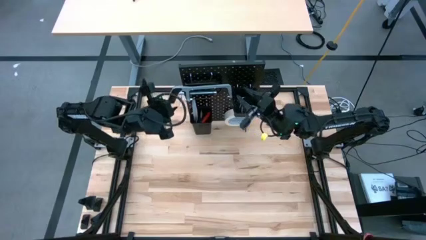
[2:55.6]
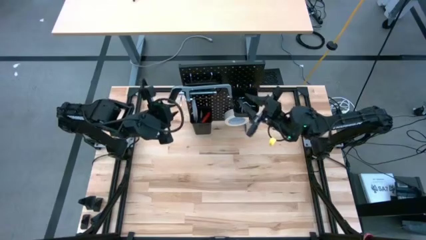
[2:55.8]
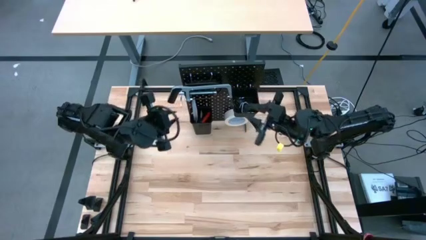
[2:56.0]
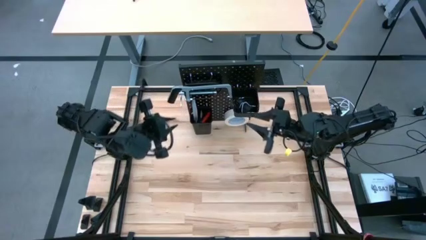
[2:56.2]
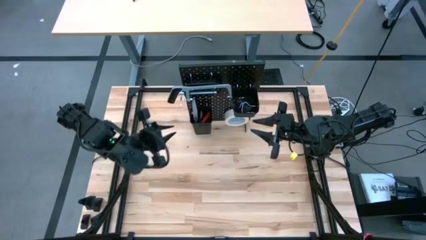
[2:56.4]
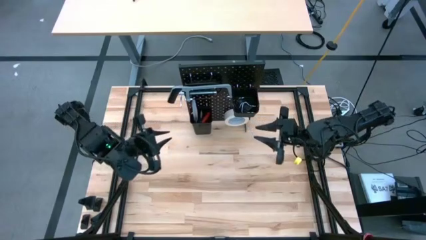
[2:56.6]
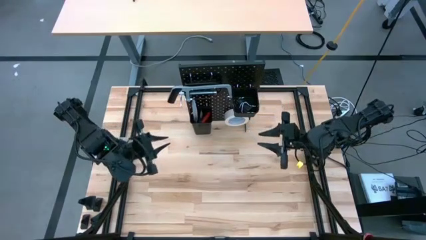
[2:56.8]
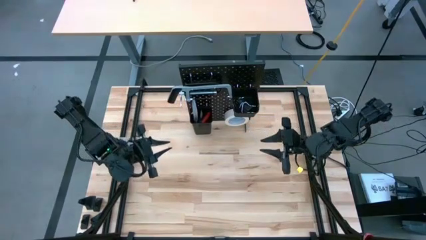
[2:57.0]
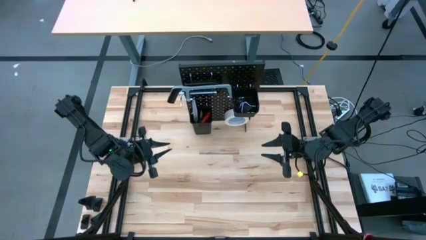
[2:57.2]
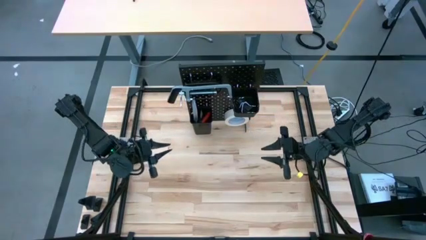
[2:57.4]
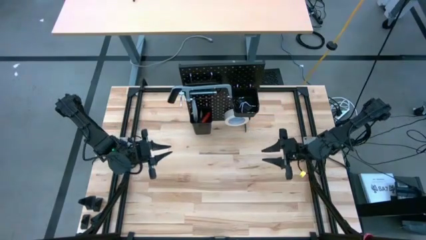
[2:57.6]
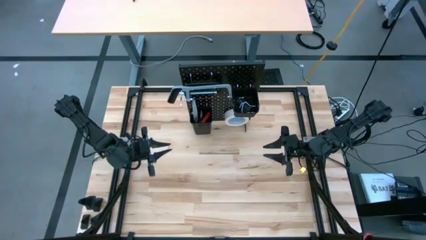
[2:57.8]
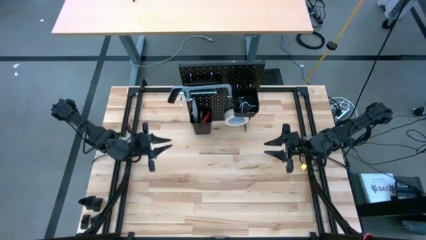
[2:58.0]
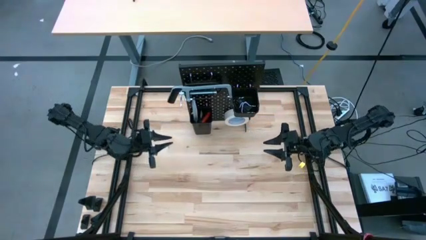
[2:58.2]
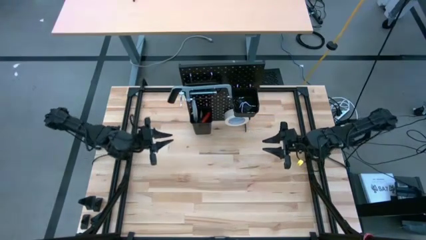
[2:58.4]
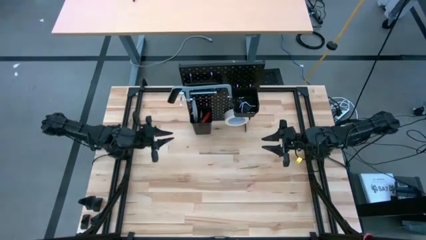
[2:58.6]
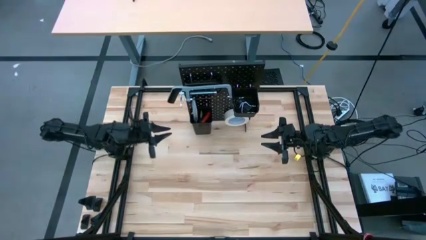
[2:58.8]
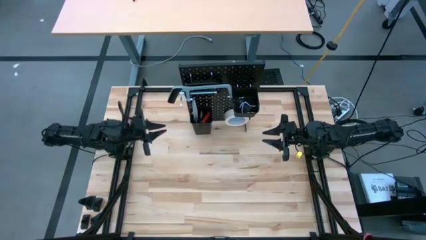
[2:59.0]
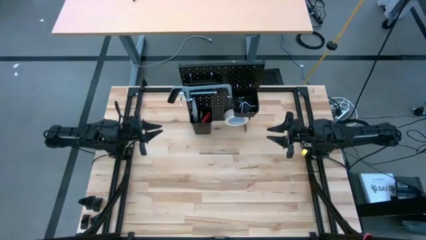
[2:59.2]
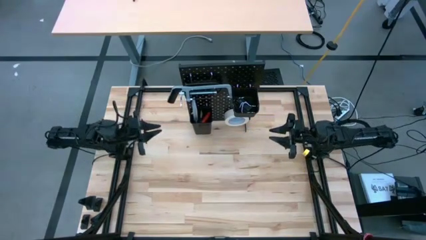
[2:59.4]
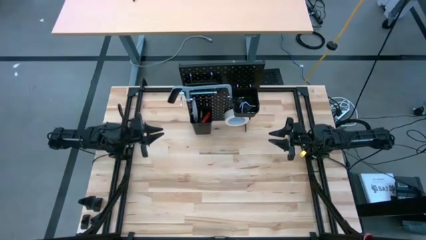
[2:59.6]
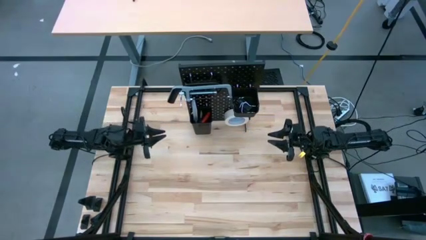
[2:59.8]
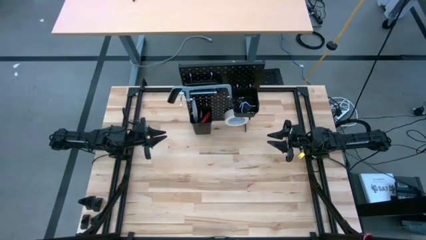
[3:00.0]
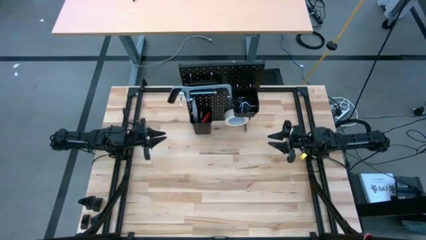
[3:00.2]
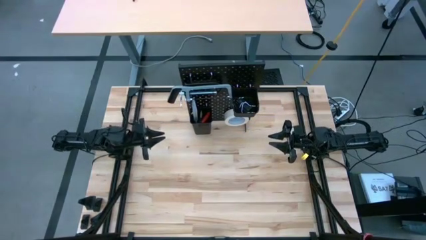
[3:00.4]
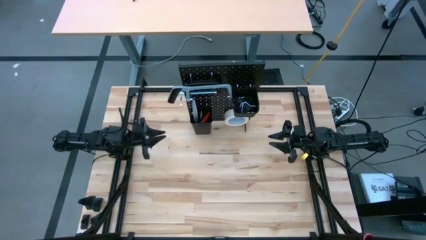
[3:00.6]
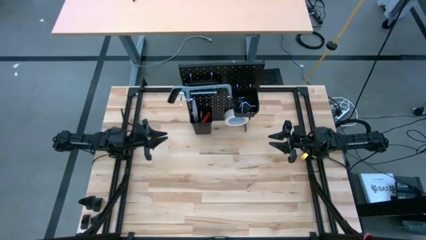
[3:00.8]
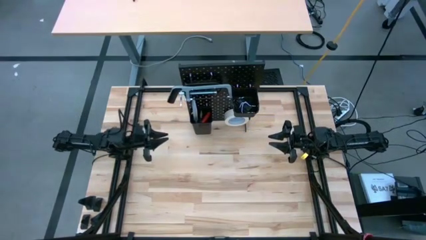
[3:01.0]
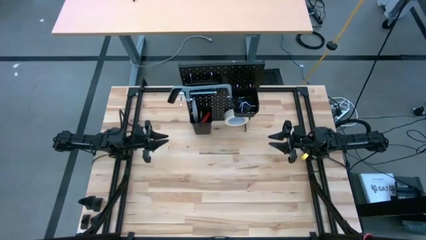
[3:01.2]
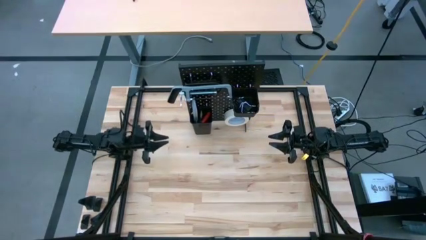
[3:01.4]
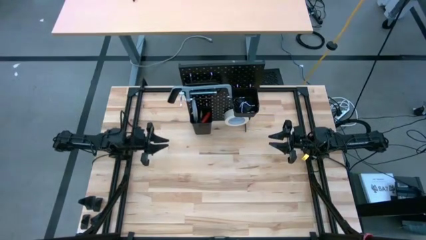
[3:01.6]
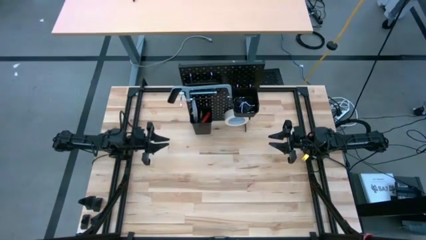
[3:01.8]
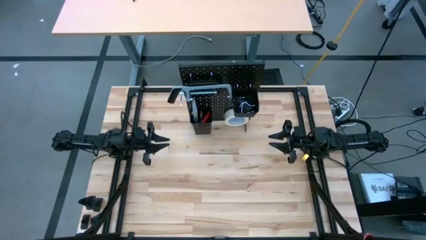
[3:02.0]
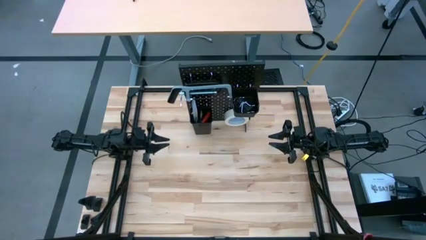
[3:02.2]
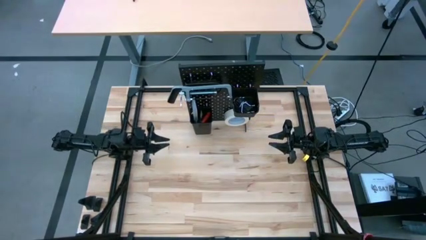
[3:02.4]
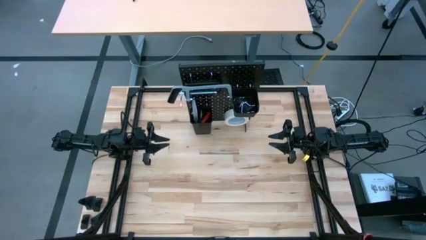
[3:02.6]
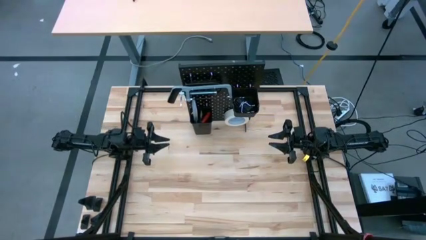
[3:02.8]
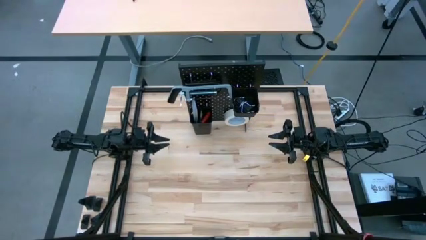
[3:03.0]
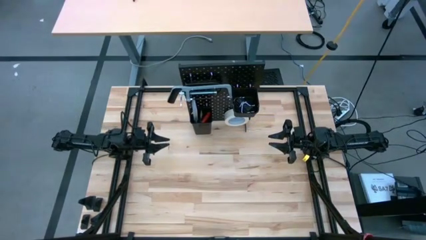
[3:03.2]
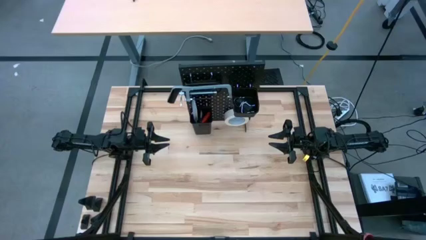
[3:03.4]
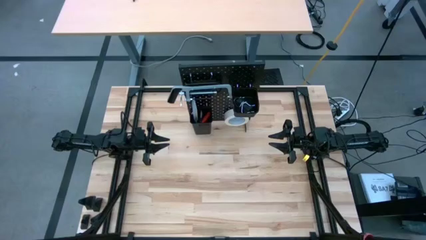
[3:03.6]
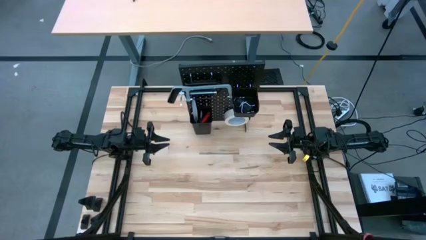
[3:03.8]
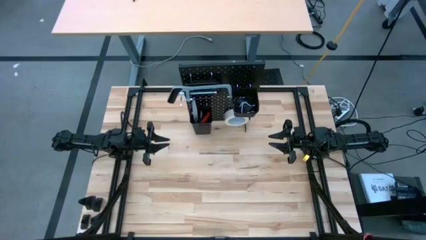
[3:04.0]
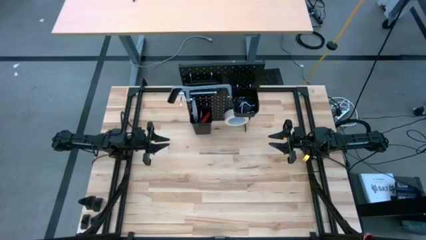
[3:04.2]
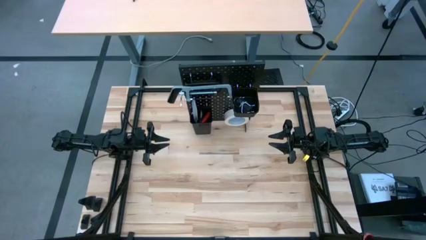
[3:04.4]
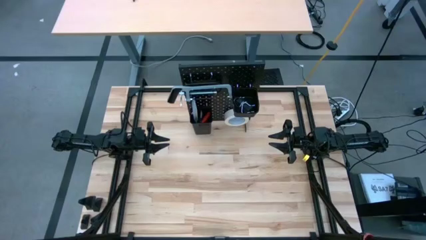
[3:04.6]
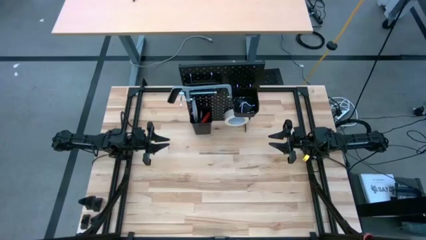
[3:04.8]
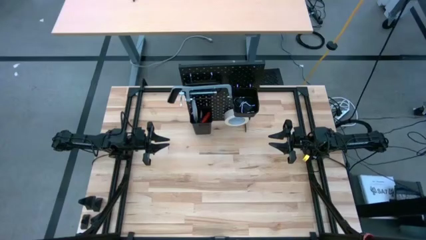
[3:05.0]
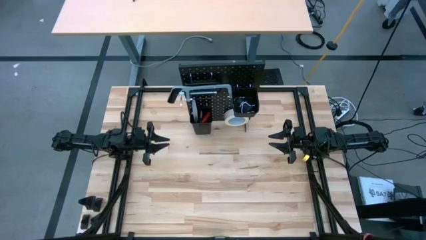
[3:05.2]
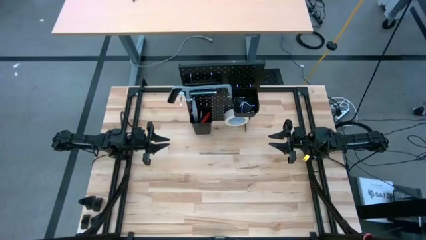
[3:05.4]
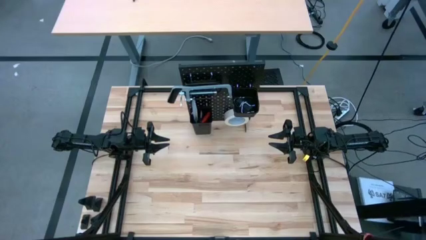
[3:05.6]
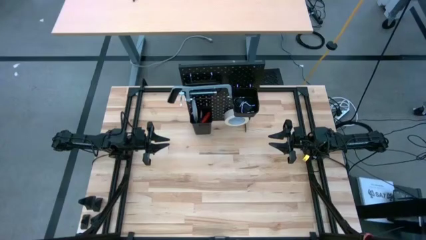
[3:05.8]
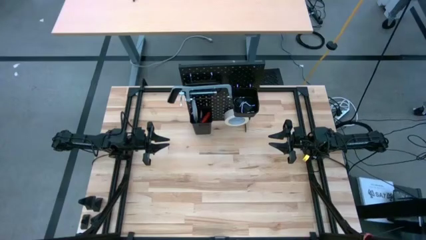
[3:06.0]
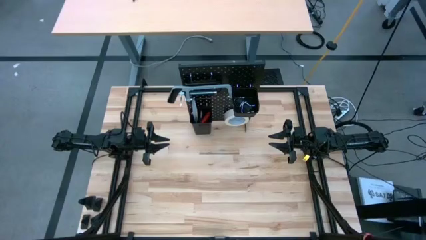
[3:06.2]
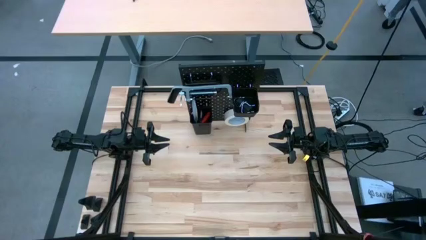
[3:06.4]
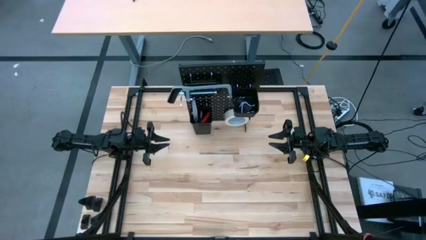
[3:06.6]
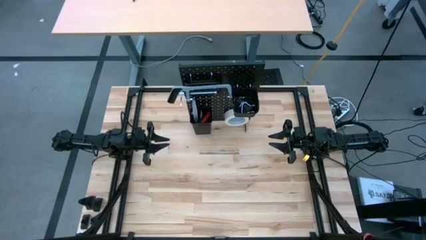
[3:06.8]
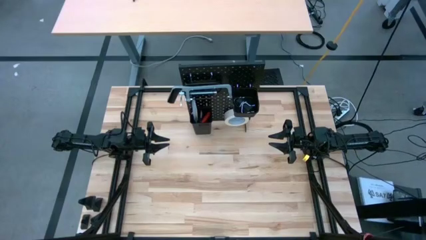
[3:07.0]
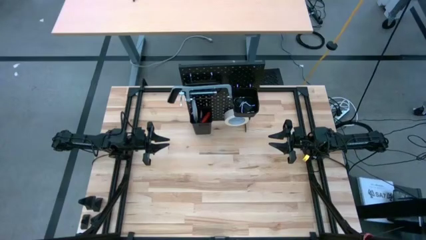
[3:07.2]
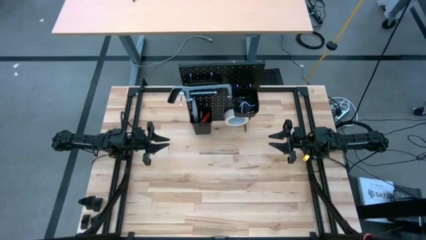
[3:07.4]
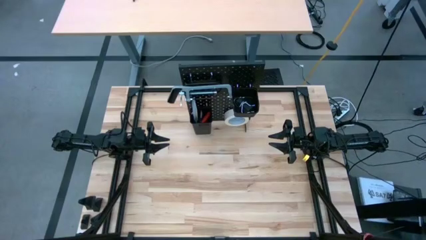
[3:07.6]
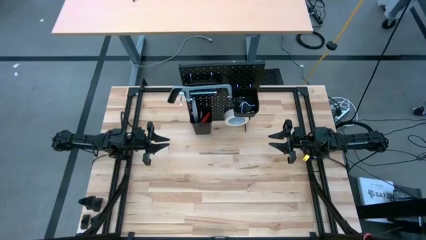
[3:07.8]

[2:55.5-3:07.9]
Task: Hang tools onto peg board
Return to Home Position
